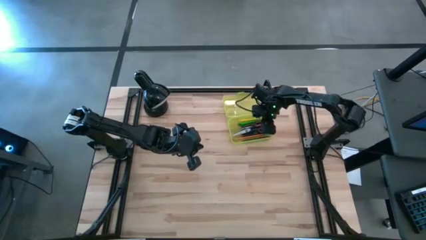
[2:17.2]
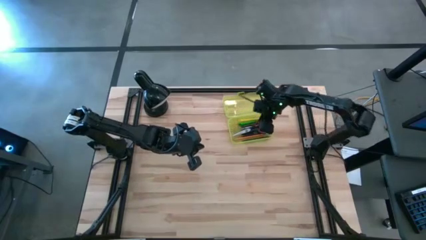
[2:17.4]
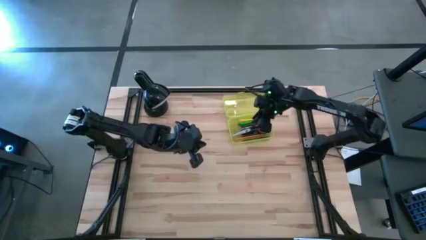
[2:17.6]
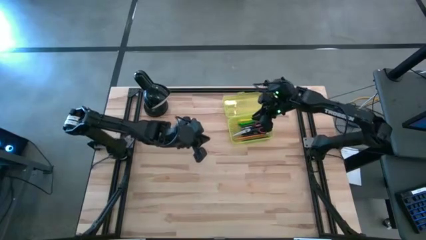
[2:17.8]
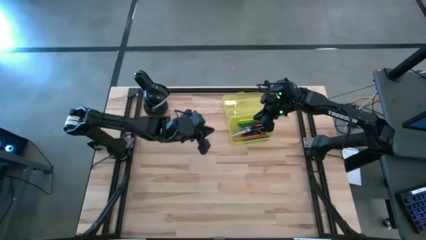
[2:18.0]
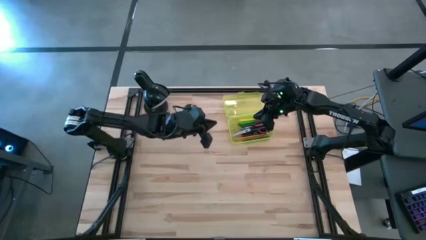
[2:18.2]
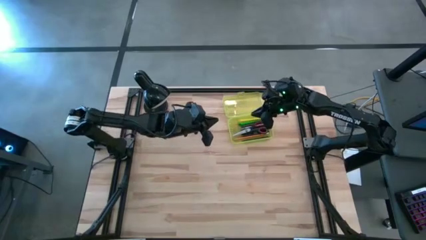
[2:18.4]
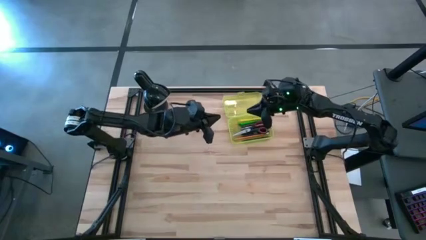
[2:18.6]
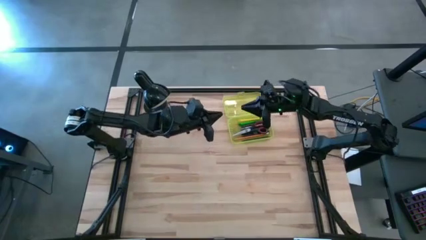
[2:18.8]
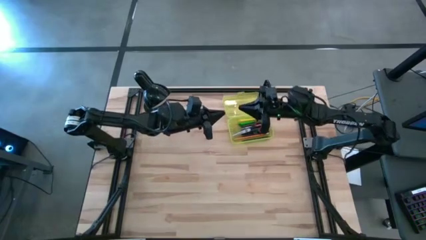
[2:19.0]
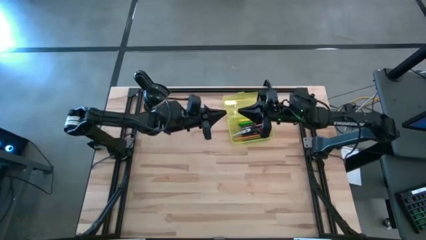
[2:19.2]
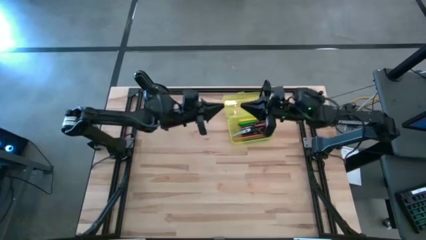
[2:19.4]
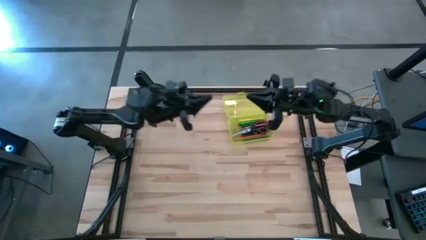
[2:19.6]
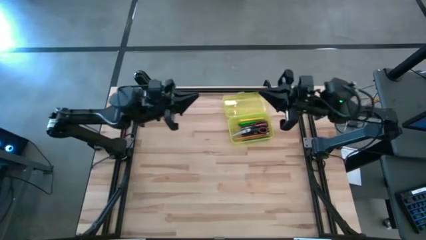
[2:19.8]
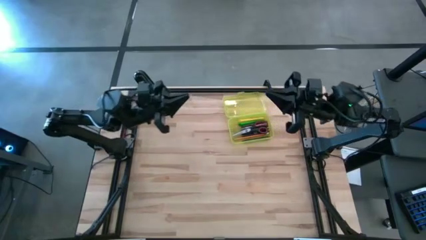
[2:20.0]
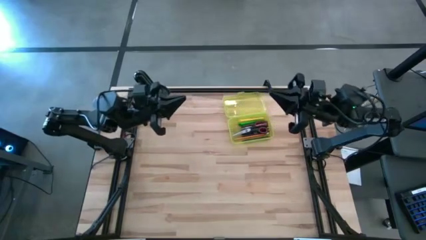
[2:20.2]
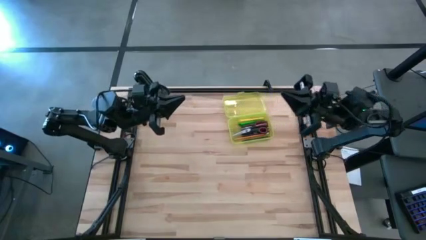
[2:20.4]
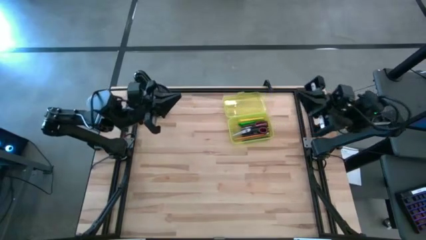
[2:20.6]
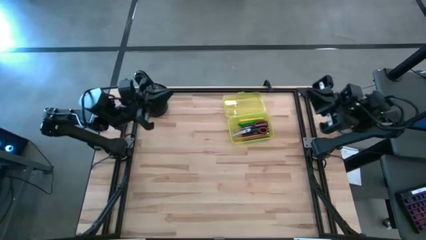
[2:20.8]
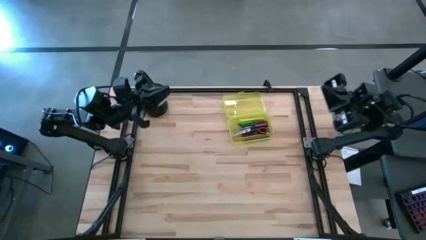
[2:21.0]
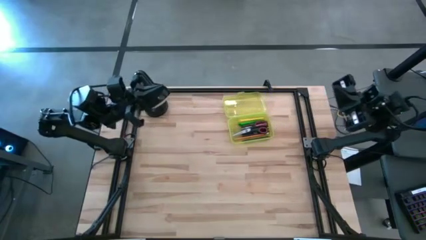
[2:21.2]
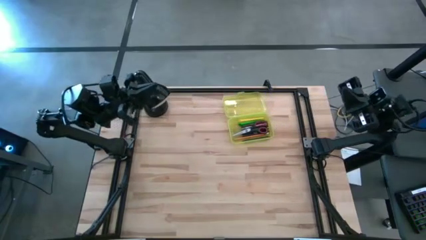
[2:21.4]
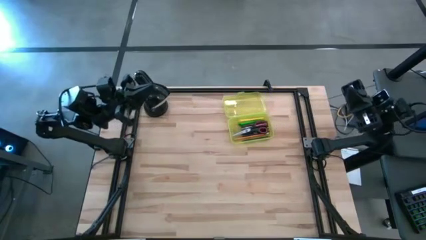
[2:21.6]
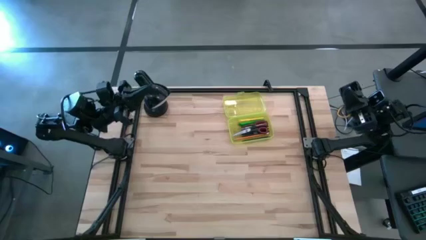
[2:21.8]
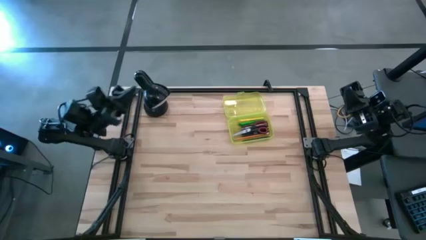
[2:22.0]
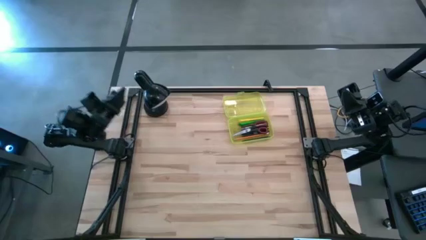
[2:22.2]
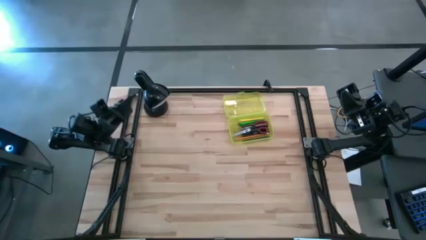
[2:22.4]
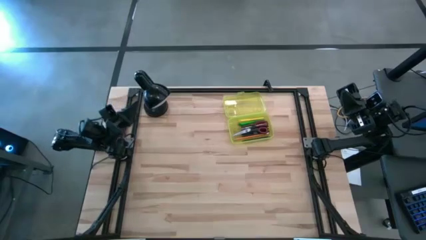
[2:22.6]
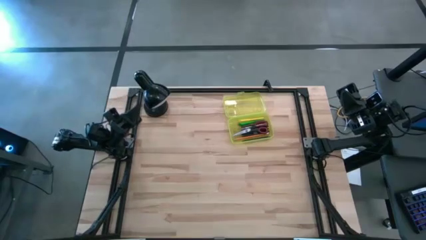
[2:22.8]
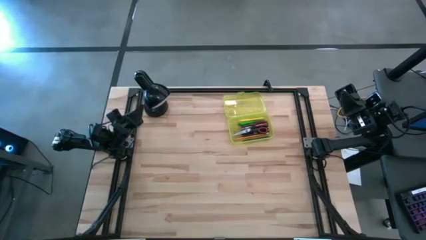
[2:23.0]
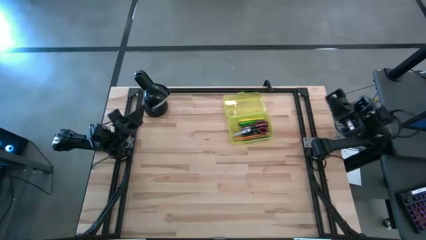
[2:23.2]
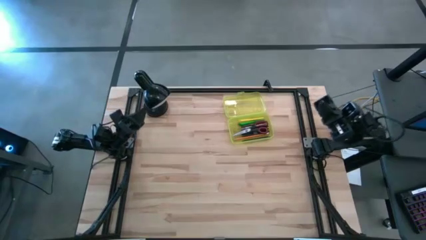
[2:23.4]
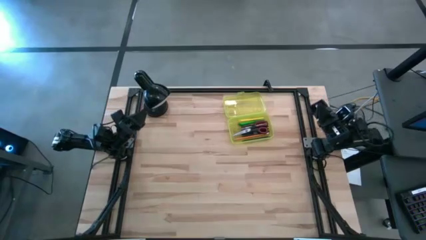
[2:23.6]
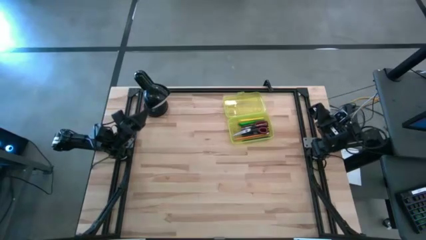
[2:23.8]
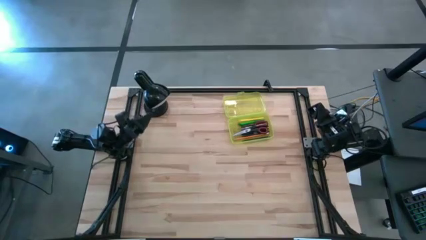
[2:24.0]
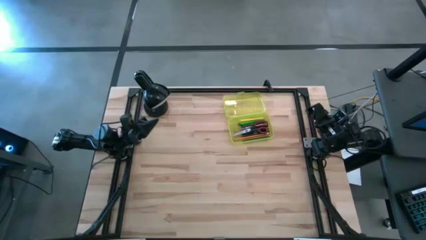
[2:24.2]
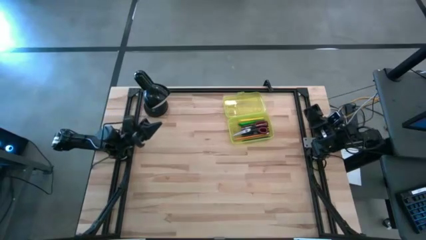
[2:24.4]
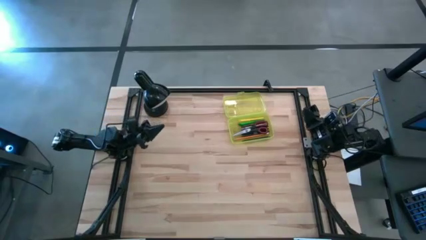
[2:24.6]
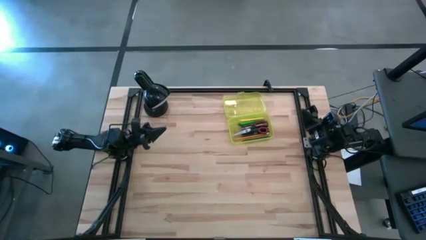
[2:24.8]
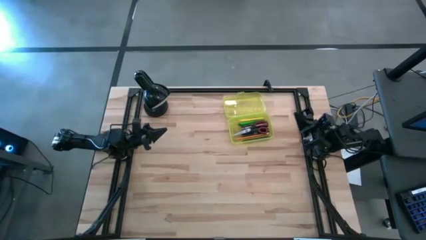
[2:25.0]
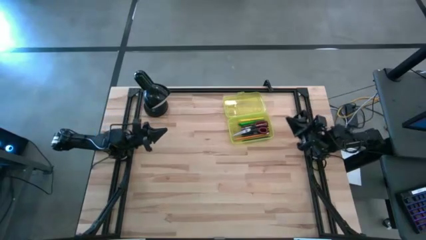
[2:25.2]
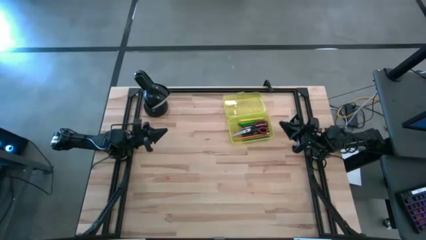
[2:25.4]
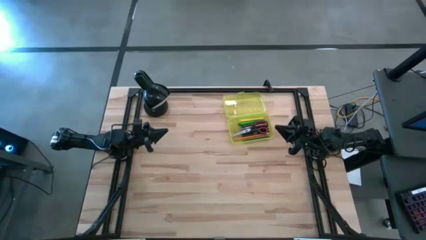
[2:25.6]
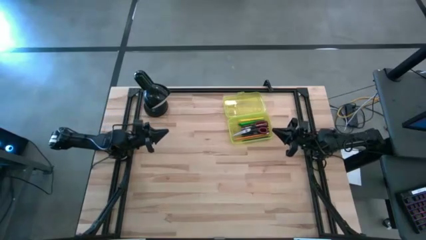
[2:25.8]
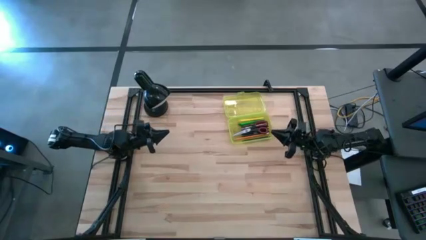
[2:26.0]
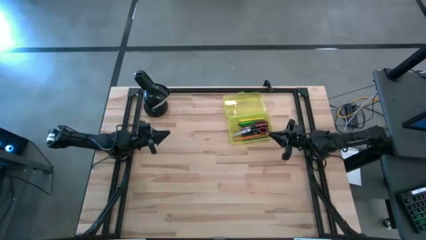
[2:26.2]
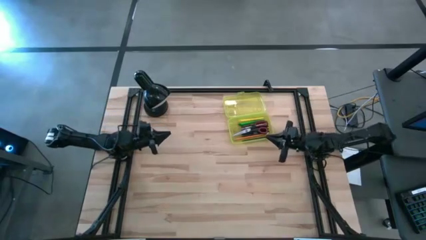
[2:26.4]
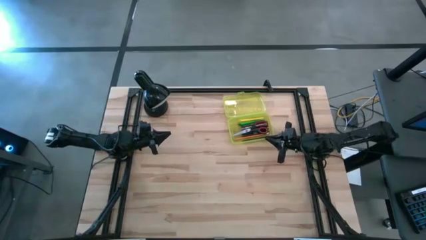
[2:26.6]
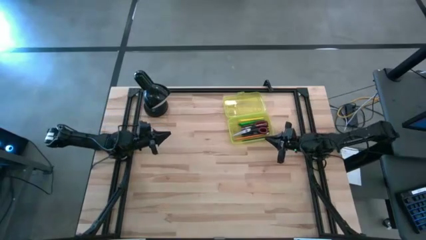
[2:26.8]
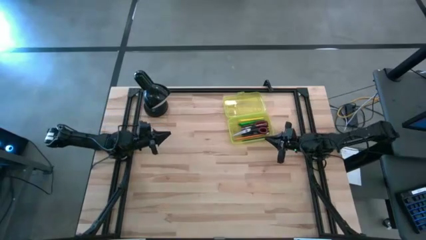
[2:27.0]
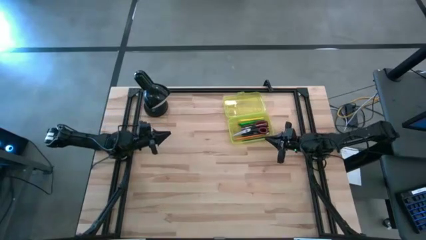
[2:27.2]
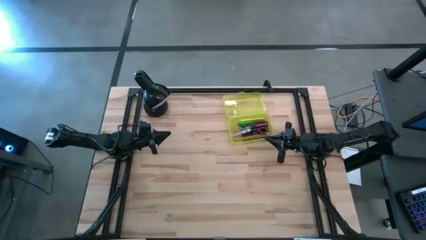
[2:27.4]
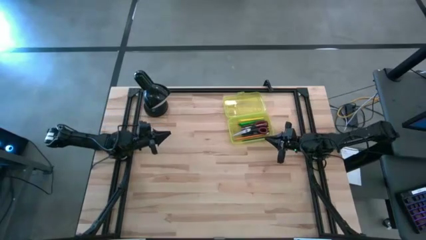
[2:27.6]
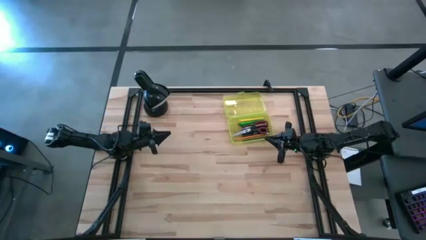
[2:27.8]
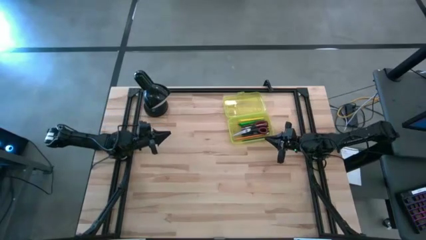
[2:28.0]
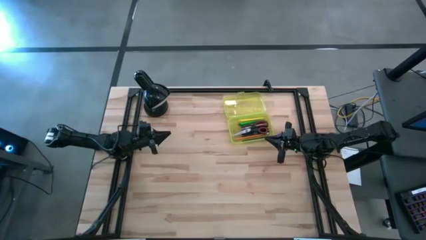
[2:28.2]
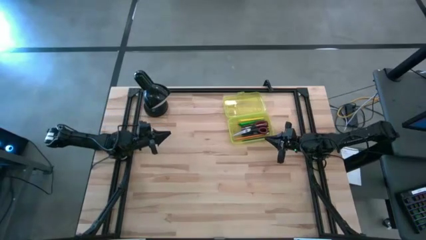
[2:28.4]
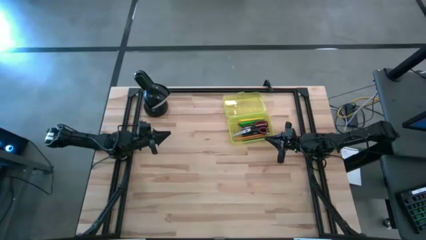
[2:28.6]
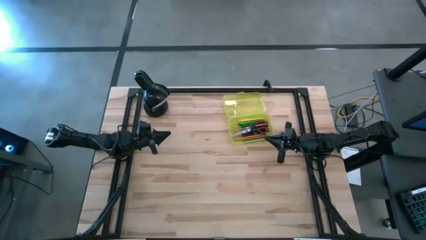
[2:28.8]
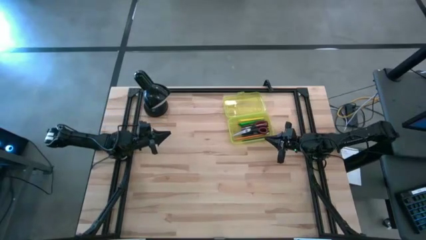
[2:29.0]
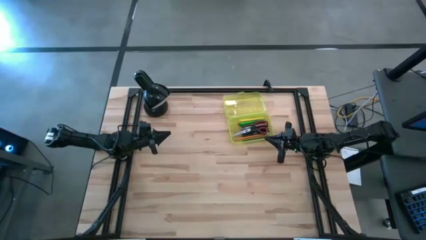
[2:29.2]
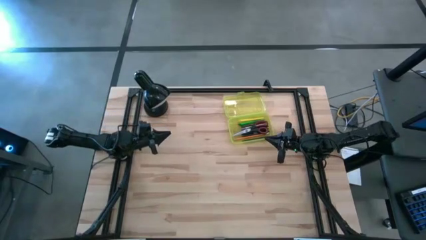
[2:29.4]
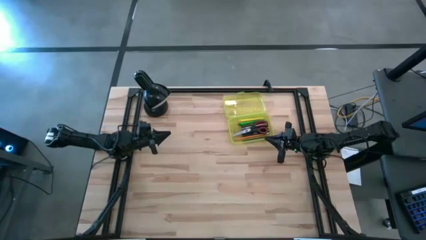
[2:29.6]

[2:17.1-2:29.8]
Task: Pick & place school supplies into a supply box
Return to Home Position

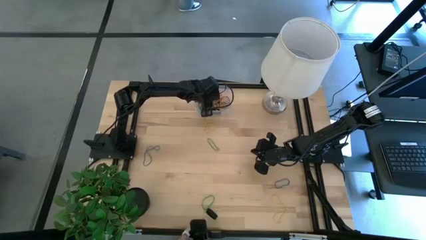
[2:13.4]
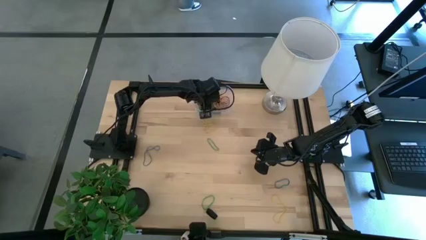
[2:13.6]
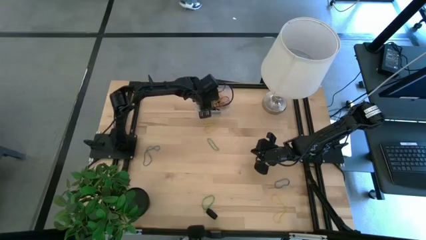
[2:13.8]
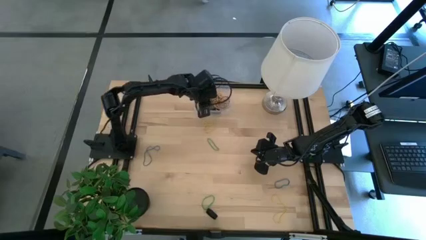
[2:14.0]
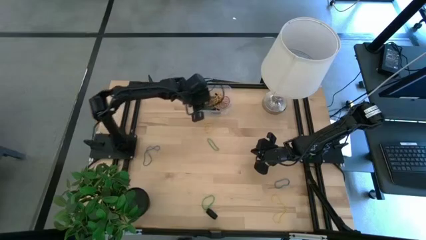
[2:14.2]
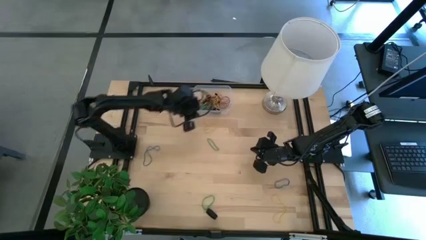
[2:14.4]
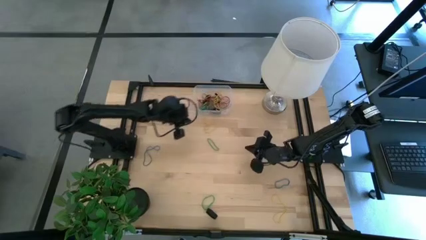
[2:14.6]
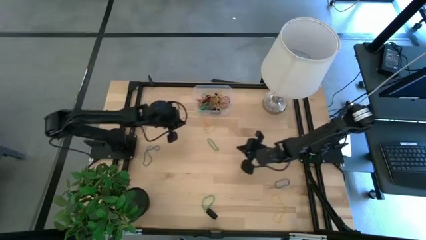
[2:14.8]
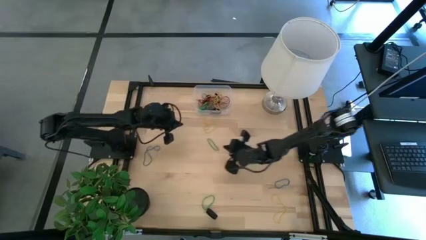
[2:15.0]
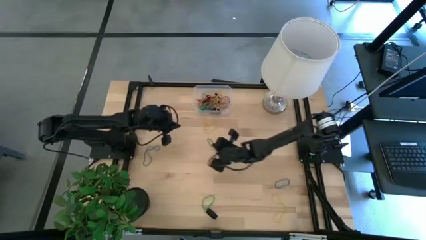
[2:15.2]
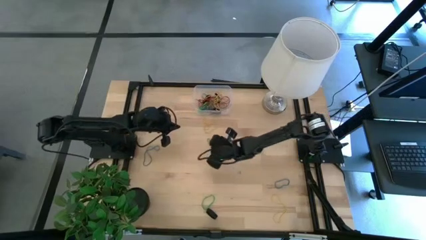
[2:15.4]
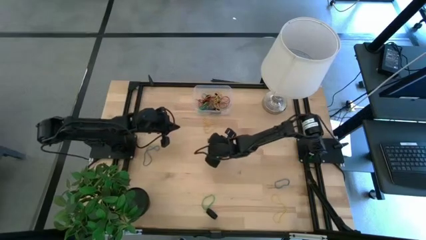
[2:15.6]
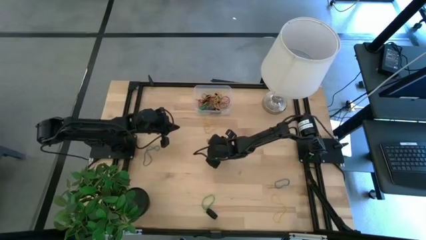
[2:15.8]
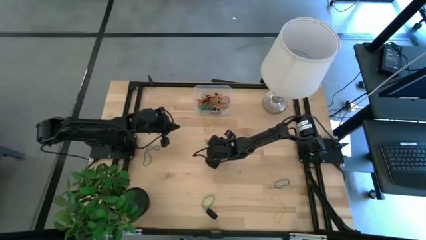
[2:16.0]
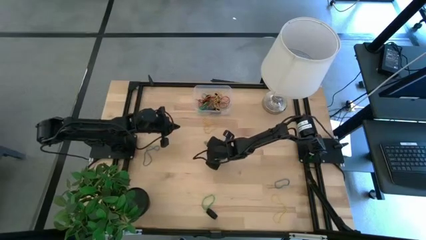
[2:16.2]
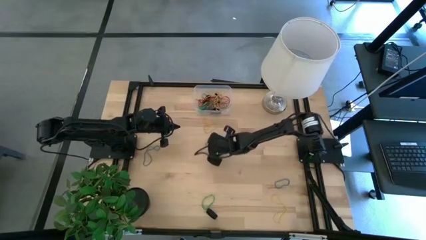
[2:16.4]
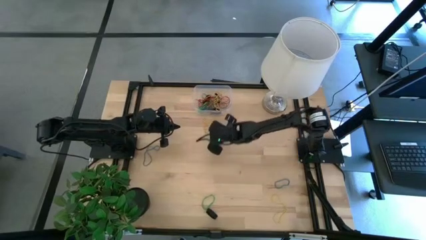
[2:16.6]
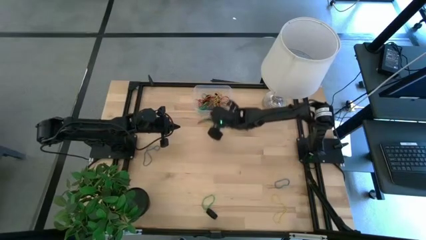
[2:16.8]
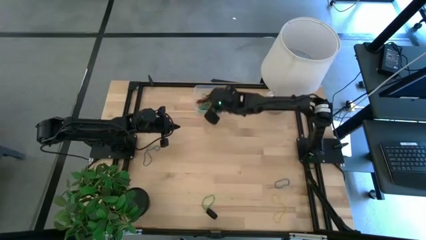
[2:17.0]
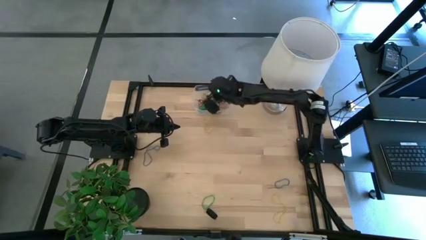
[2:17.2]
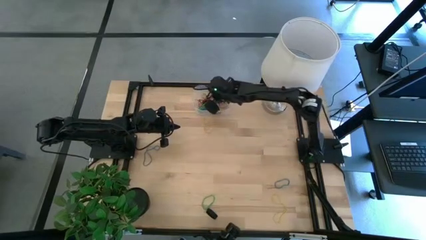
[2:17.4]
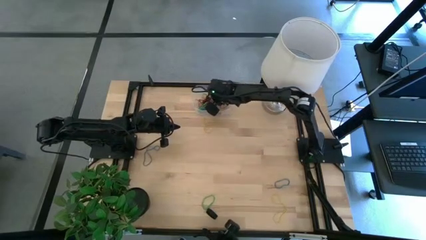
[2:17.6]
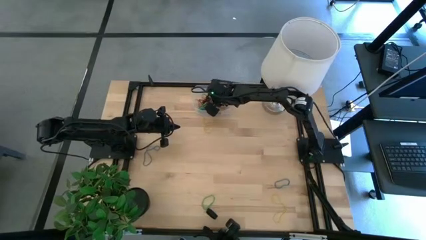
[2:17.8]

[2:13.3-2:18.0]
Task: Pick and place rubber bands into bin
Put the green rubber band into the transparent bin
